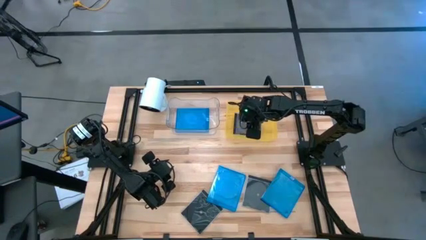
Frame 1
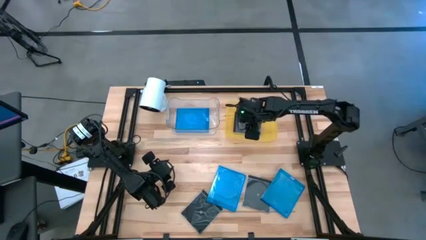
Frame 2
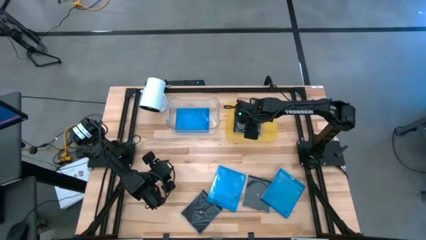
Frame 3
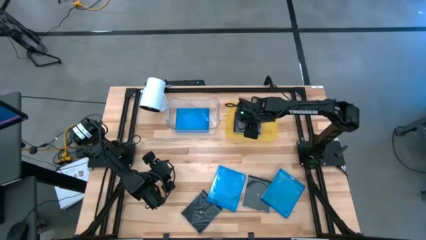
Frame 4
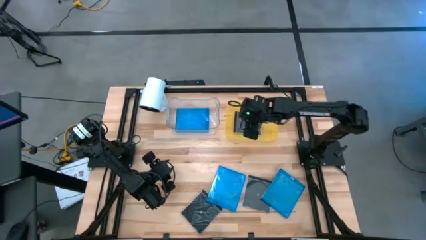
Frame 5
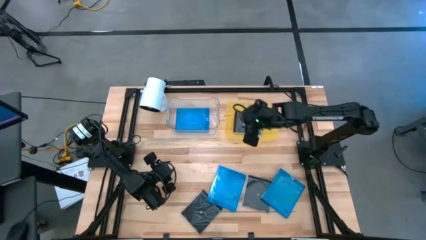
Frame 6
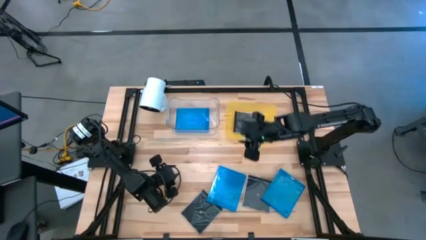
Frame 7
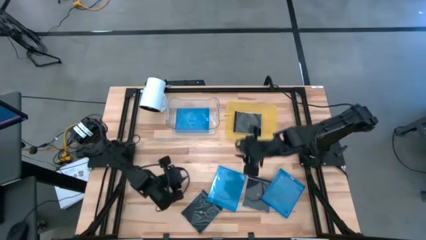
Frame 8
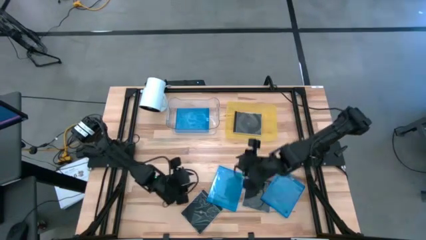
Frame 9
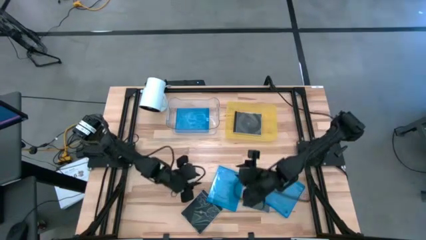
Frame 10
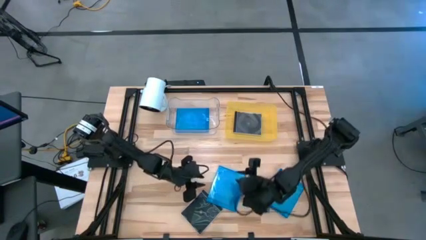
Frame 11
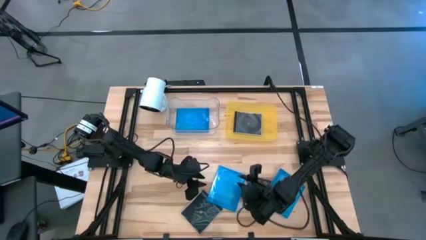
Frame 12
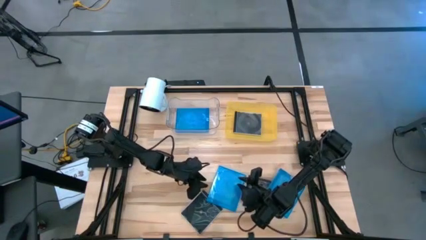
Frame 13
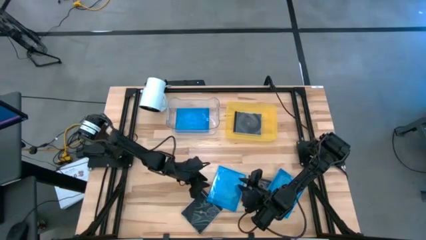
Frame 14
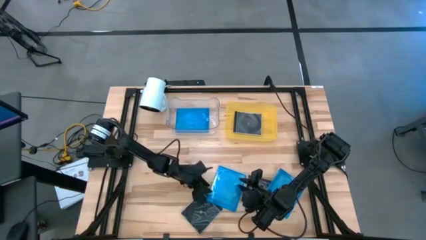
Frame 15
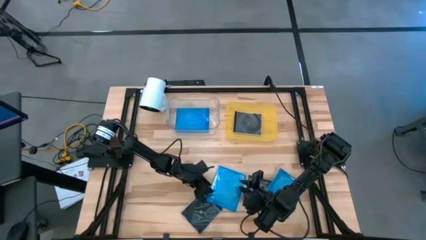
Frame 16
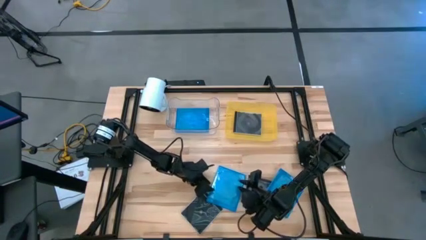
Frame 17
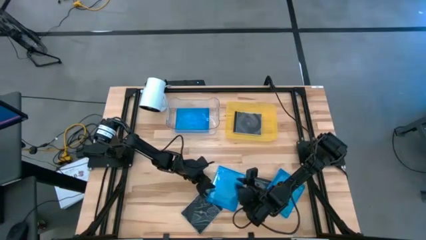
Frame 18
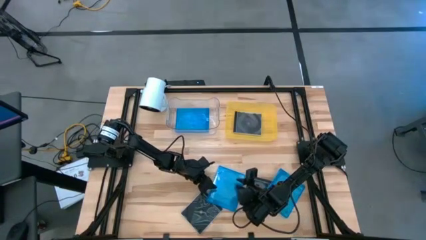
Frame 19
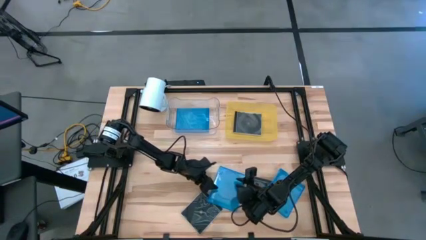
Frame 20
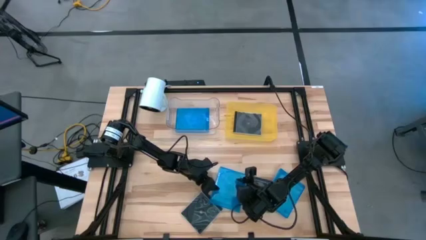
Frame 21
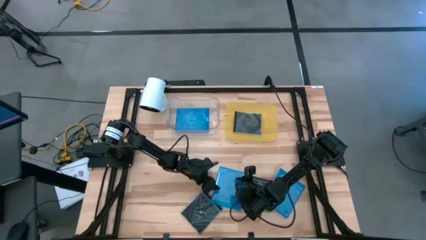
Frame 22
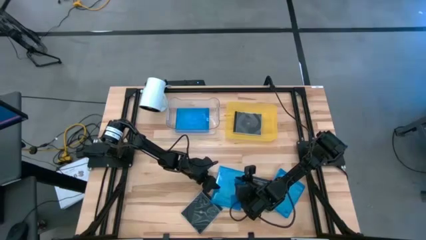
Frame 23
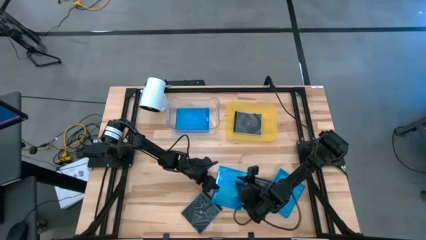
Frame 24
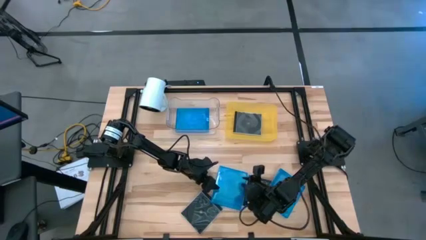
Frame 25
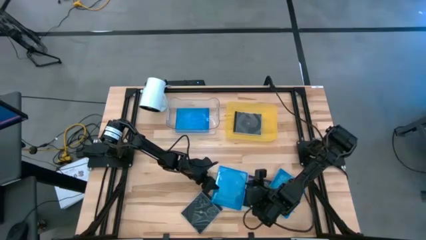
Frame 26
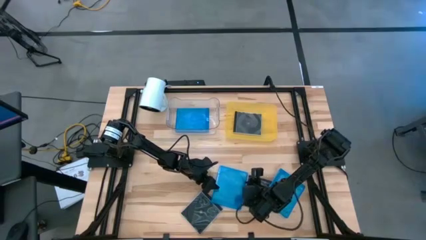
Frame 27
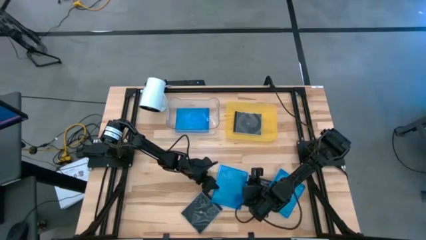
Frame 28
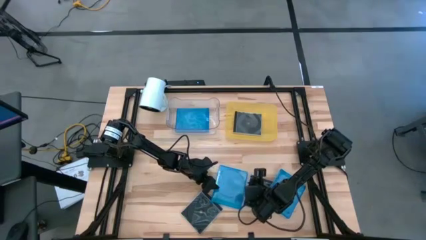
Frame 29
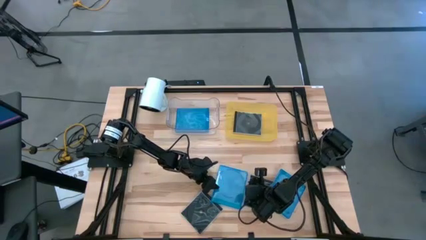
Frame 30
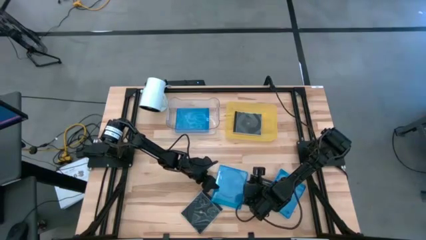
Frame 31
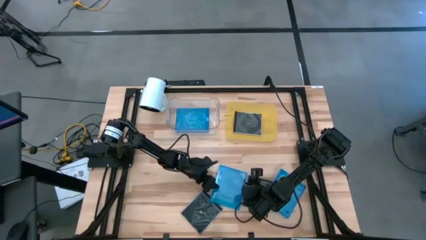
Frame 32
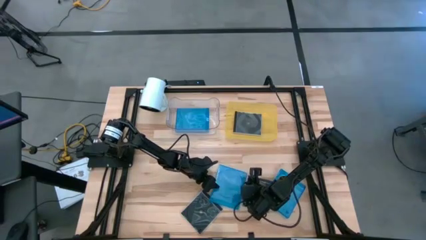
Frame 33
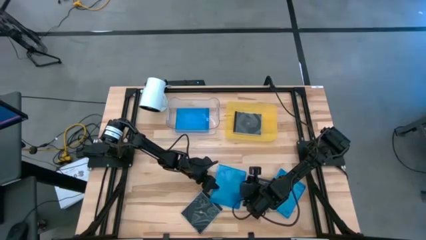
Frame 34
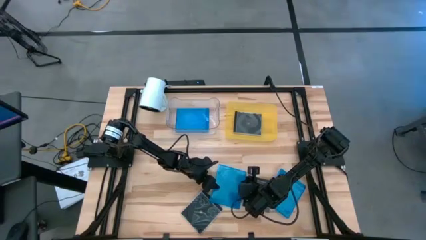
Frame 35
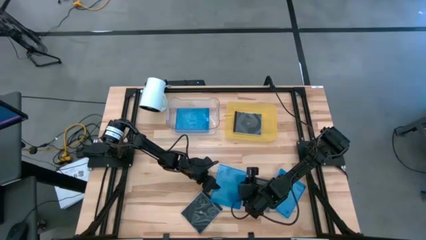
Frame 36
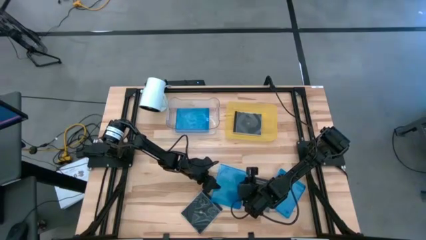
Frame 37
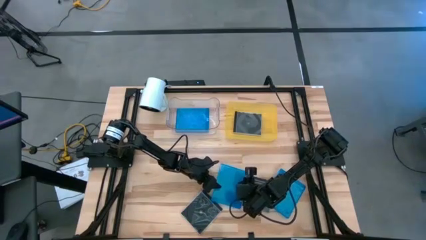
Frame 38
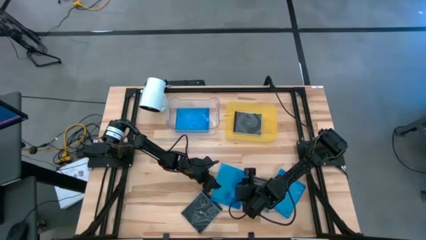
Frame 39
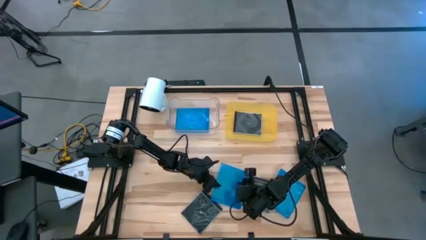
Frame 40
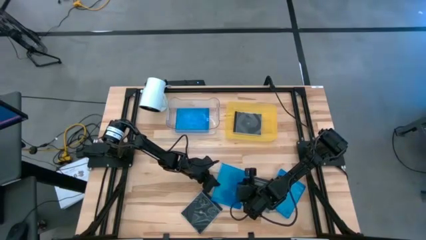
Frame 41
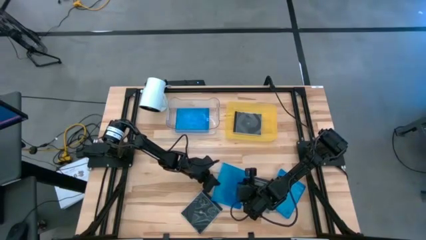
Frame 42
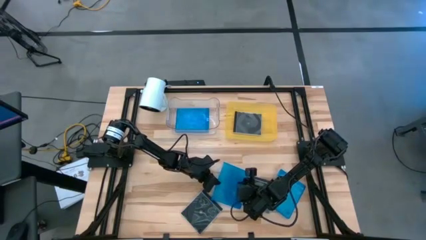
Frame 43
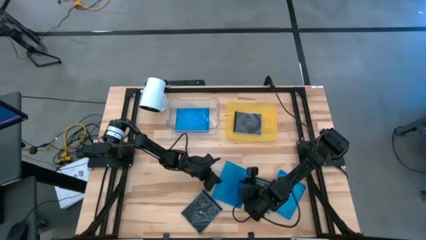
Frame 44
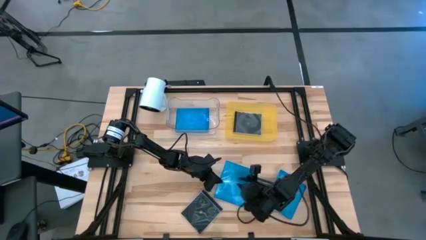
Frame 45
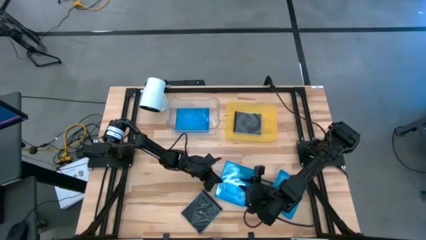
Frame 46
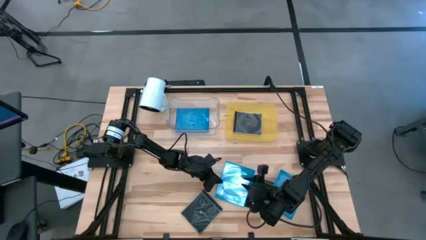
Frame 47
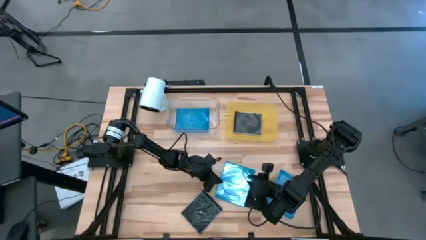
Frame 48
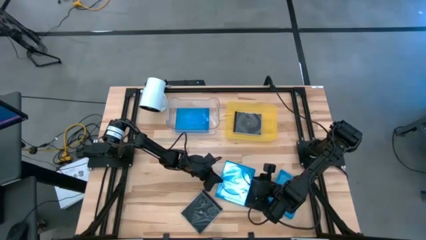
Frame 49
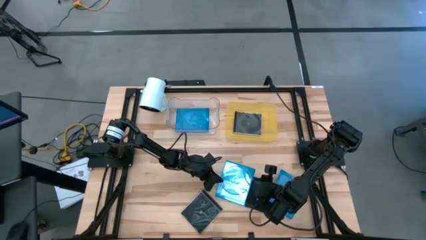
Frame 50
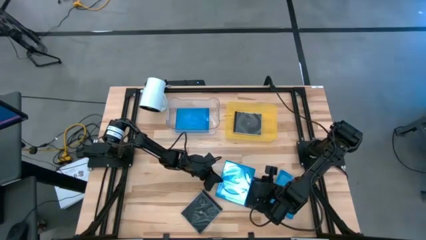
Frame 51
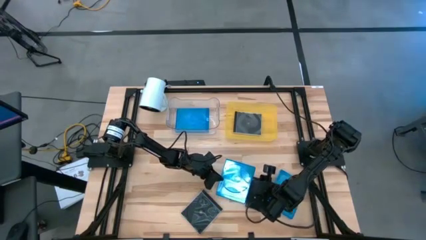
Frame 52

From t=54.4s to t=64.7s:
Task: Pick & place jewel cases by type
Put the left blue CD case into the transparent bin
